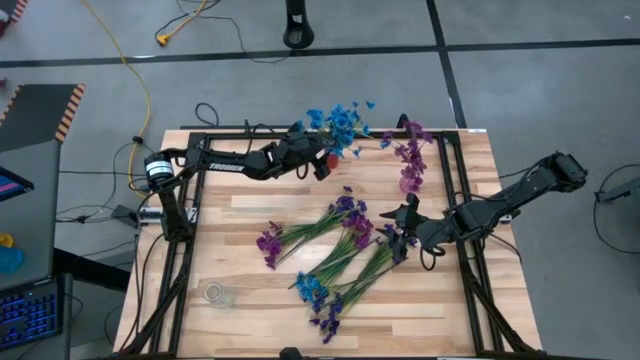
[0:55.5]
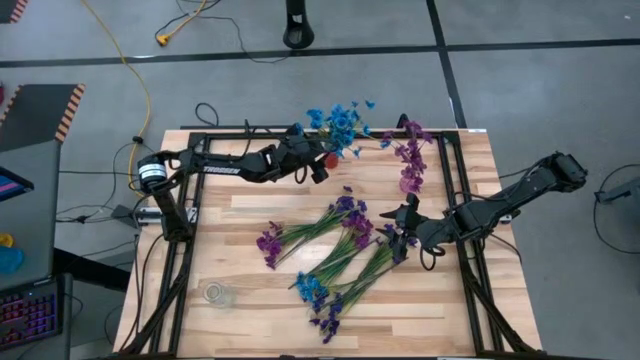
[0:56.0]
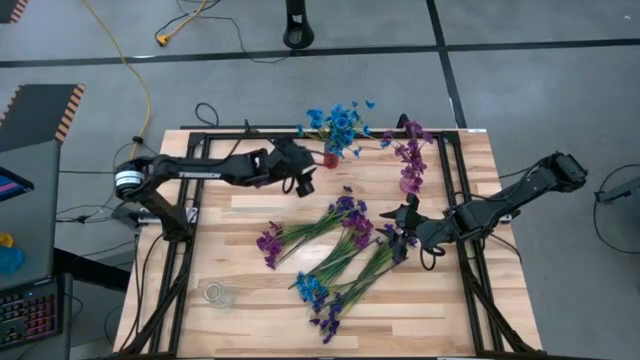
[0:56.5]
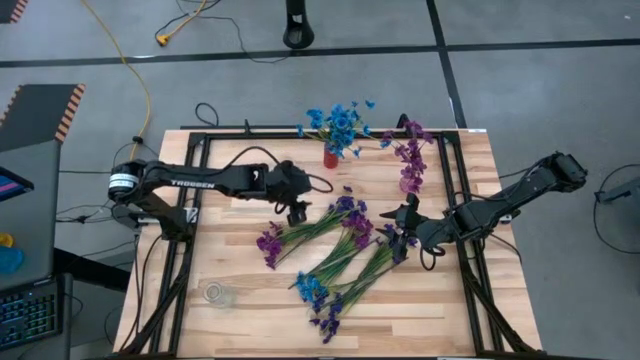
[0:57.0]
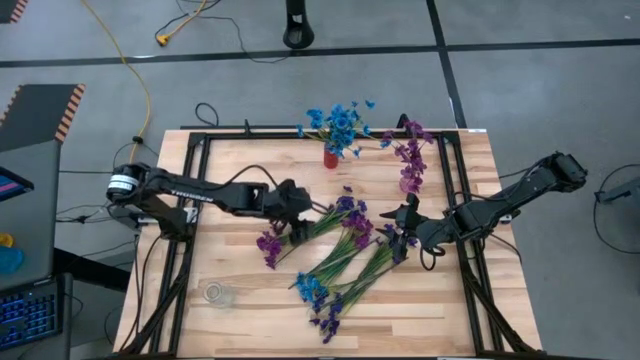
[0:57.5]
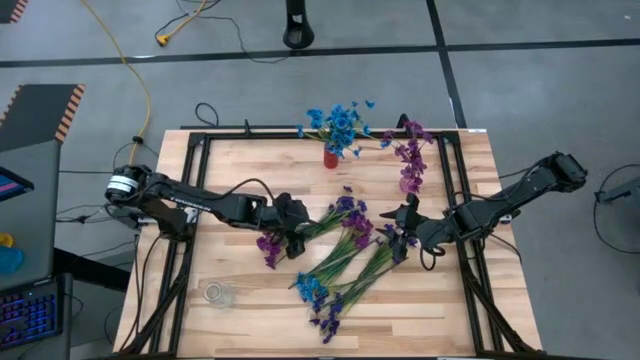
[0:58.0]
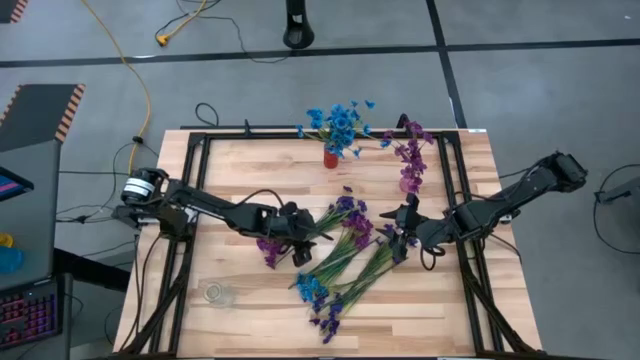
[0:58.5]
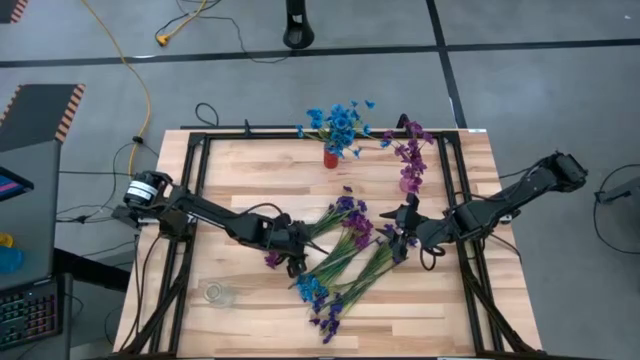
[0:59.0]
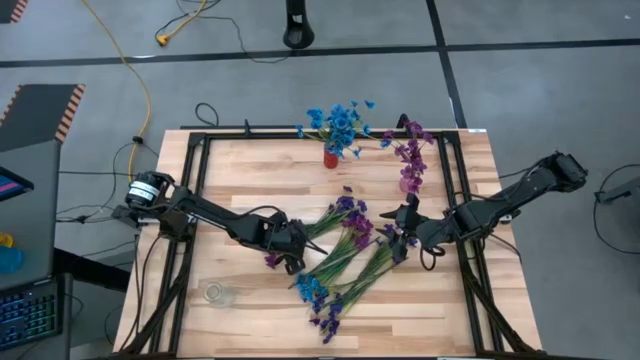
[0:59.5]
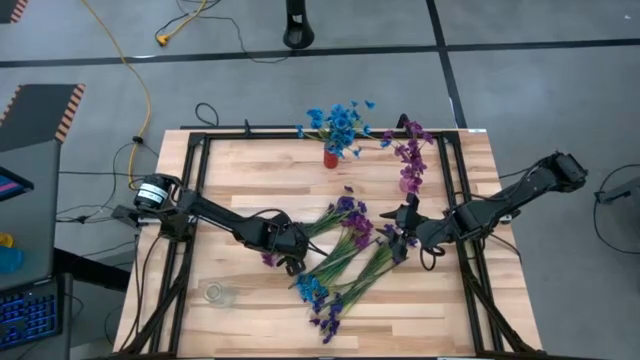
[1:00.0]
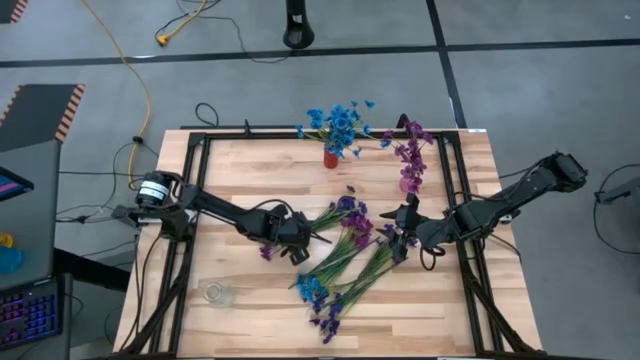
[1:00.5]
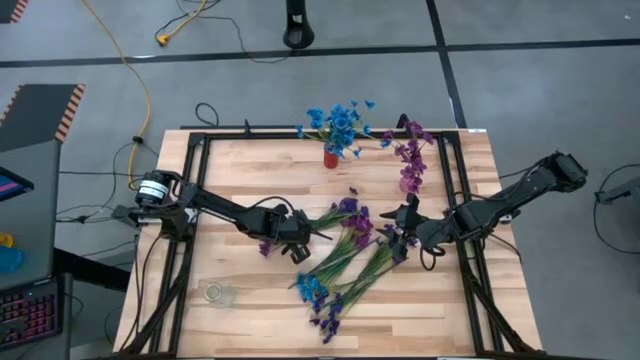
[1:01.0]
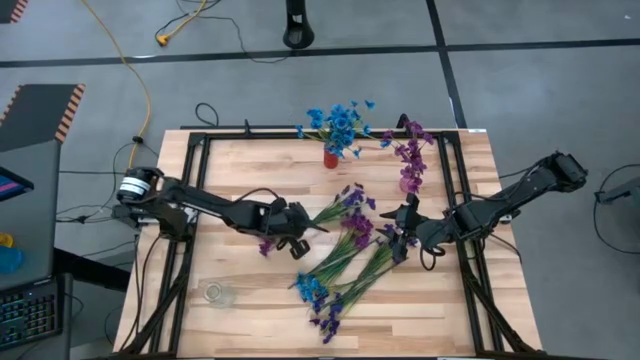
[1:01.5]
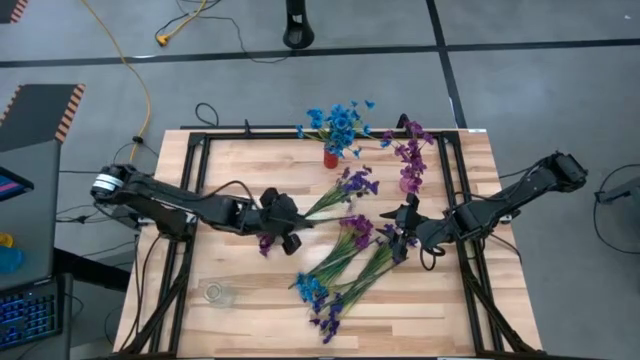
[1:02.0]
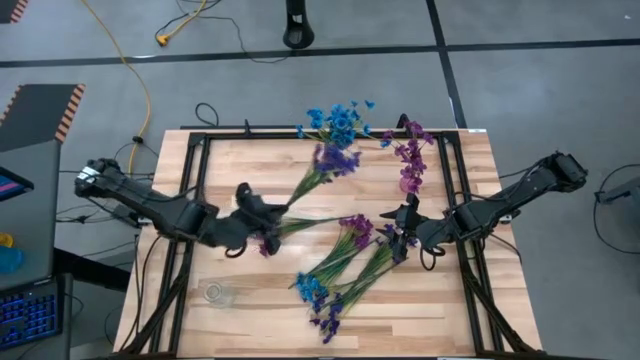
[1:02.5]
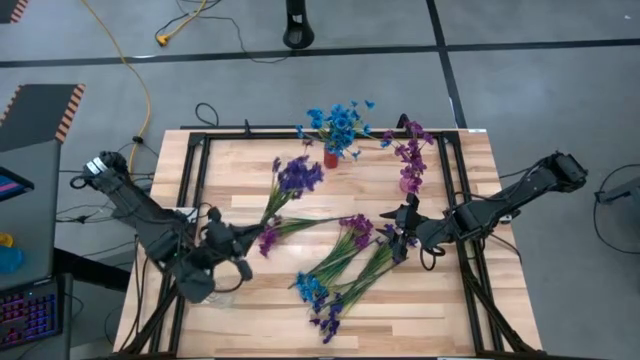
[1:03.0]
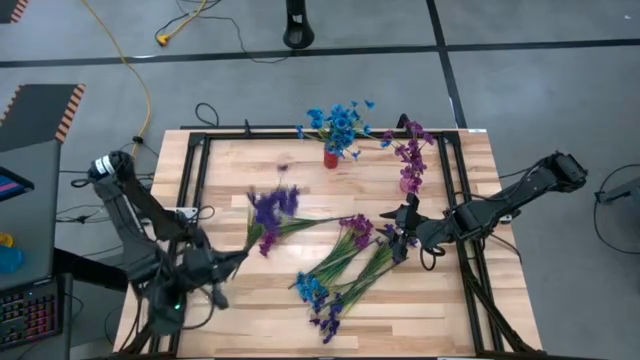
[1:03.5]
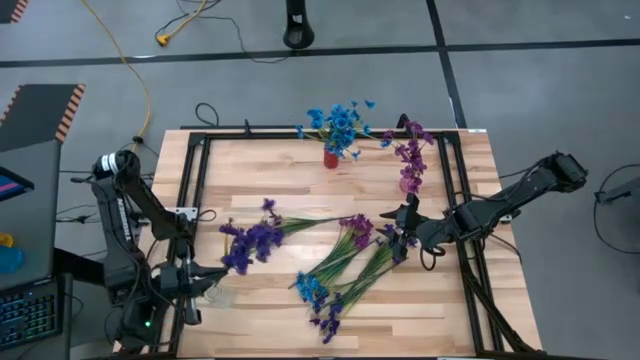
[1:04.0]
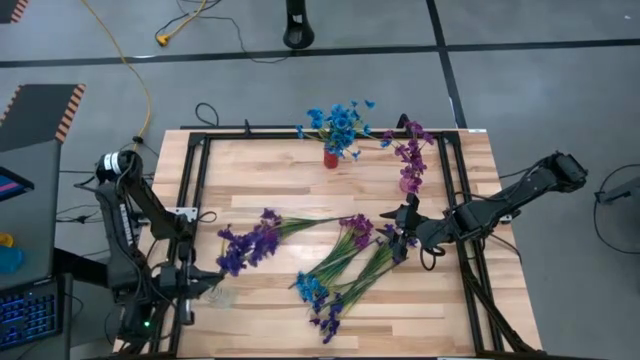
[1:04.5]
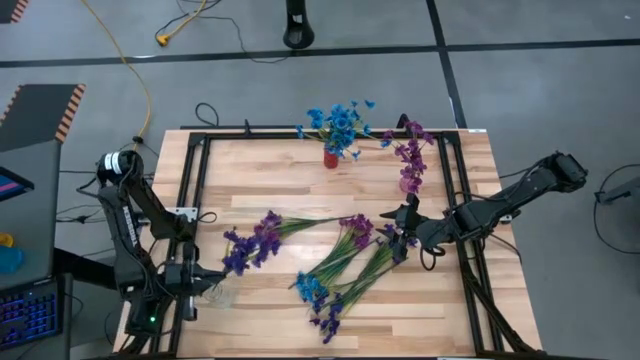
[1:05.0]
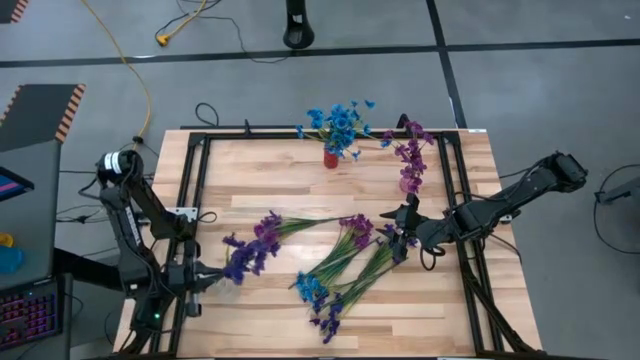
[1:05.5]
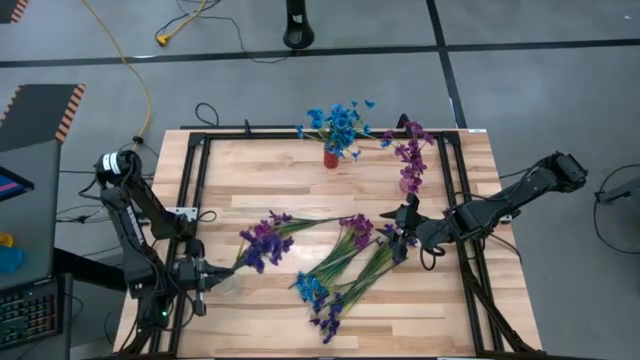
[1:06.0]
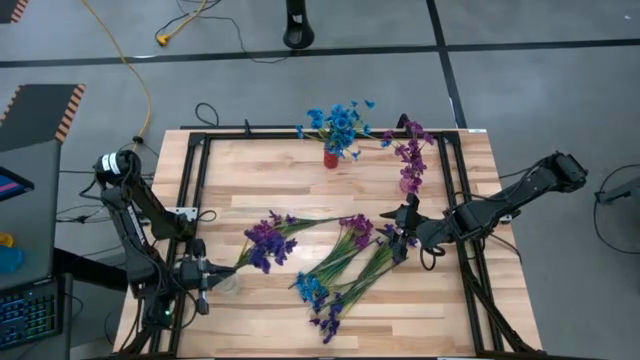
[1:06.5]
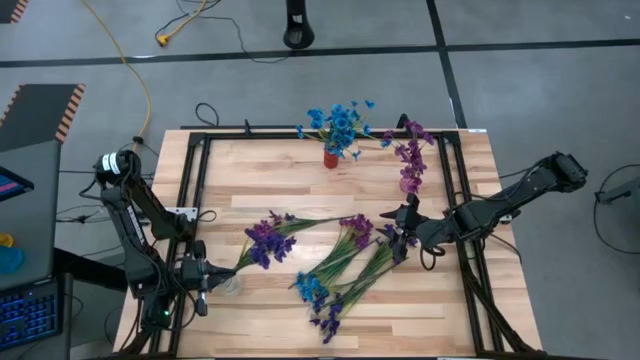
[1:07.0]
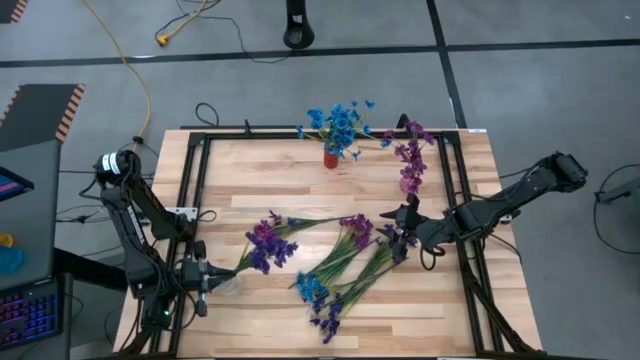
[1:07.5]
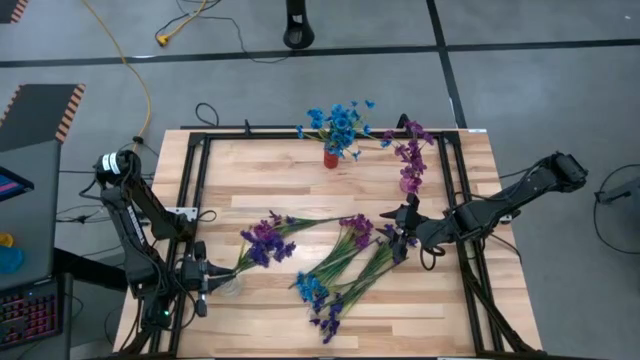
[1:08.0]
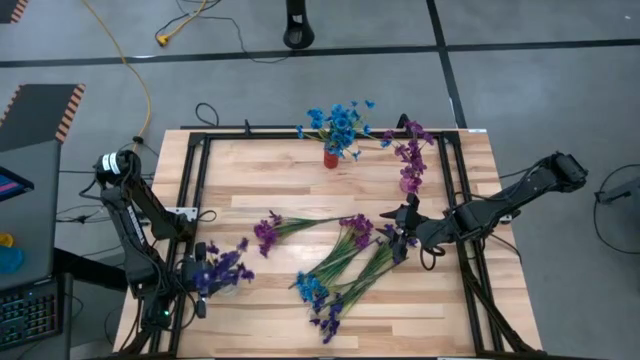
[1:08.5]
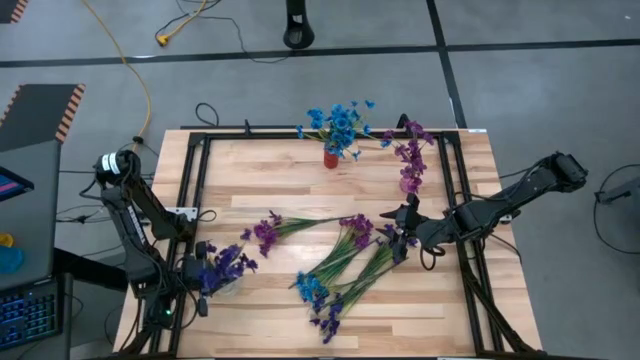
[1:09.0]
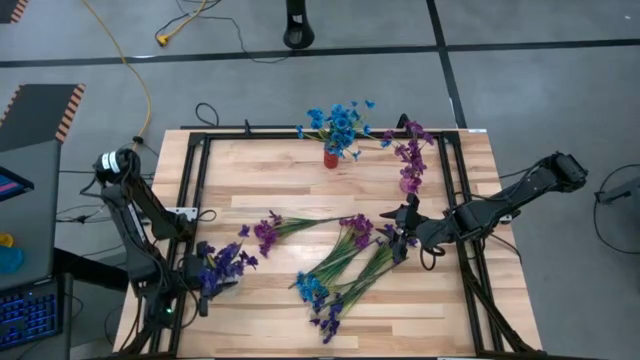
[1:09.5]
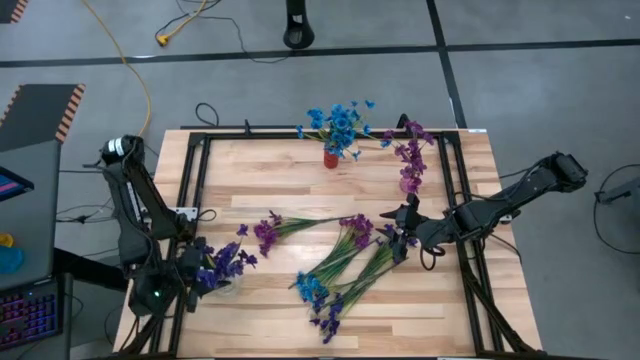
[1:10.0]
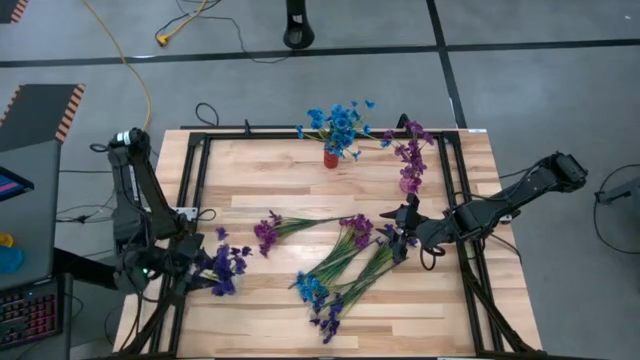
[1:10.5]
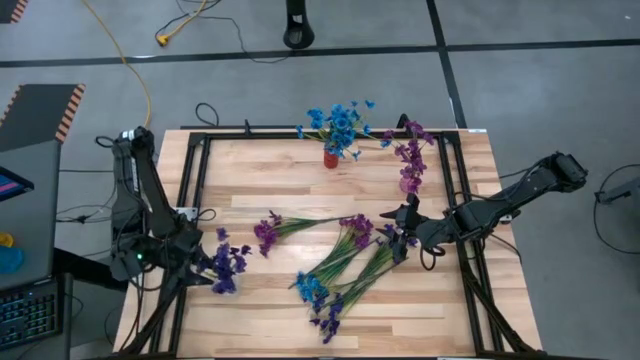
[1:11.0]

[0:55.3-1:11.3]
Task: Sort flowers into vase by color
Put the top dark blue flowers into the transparent vase

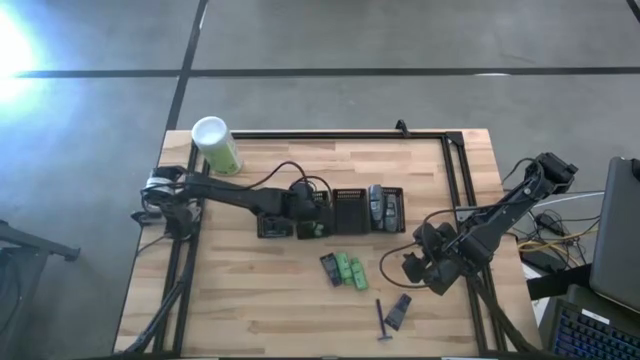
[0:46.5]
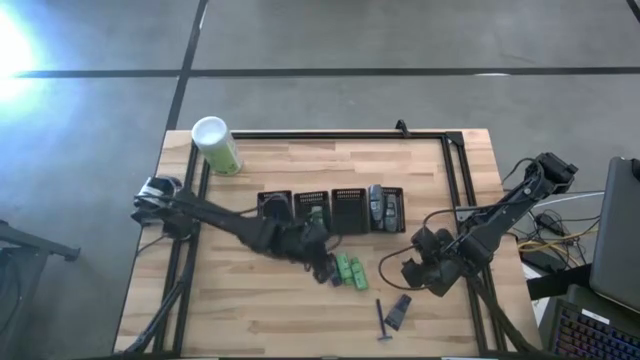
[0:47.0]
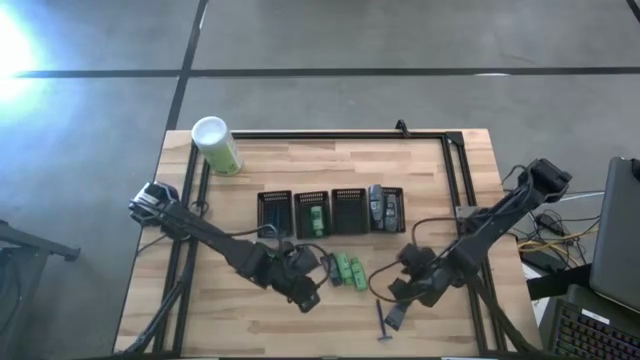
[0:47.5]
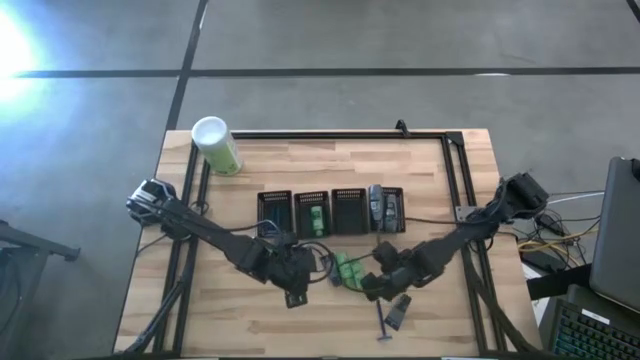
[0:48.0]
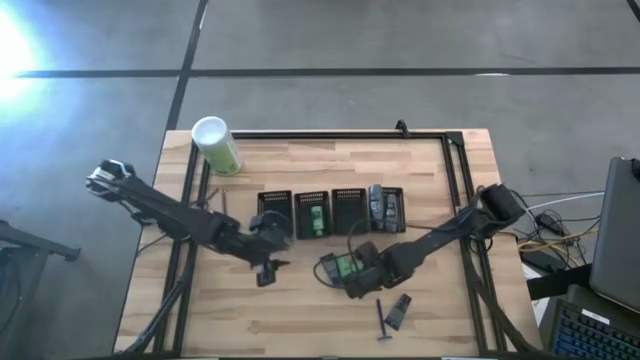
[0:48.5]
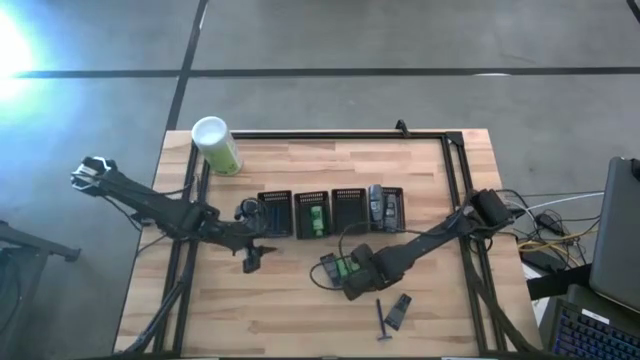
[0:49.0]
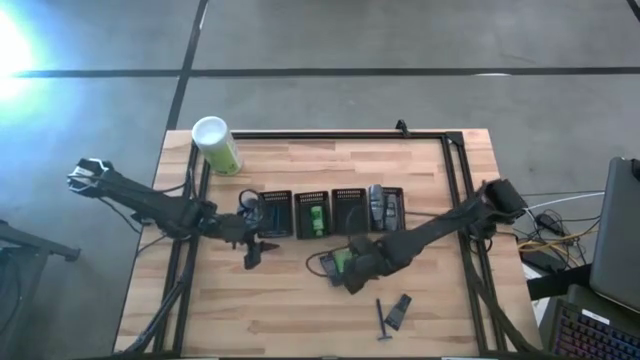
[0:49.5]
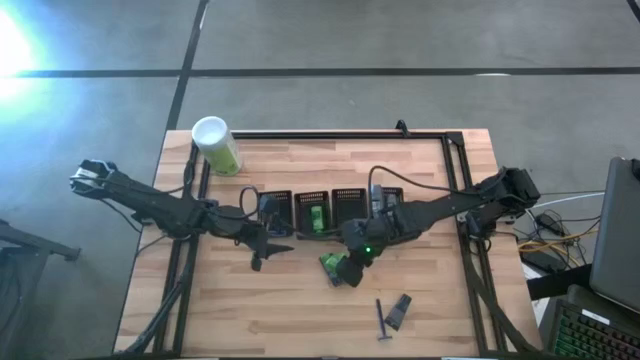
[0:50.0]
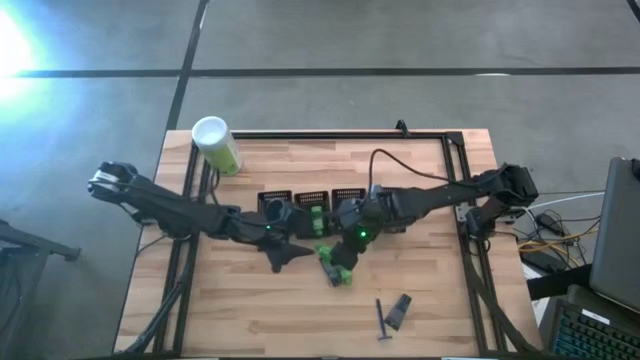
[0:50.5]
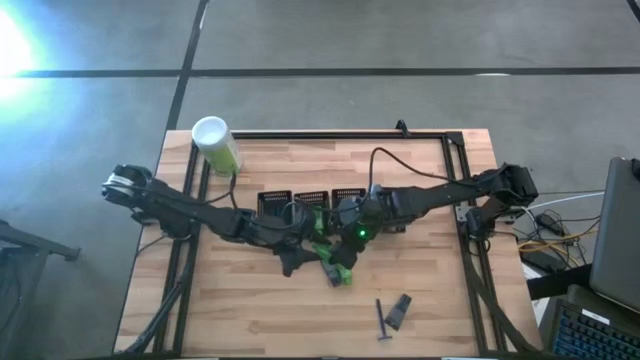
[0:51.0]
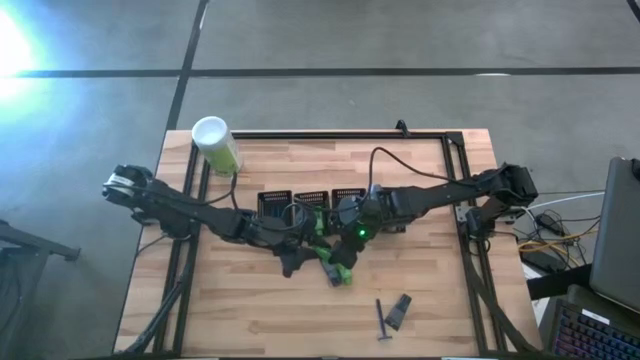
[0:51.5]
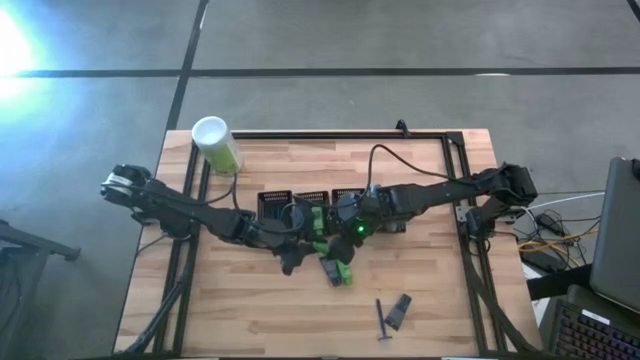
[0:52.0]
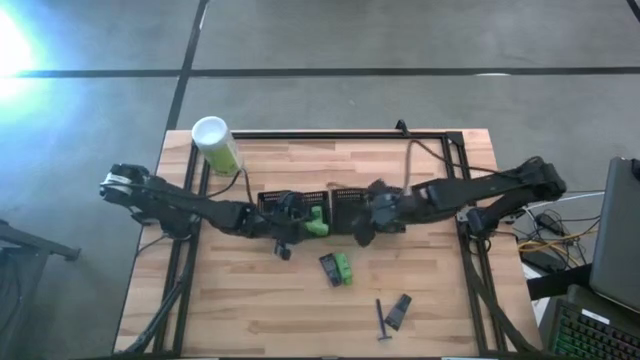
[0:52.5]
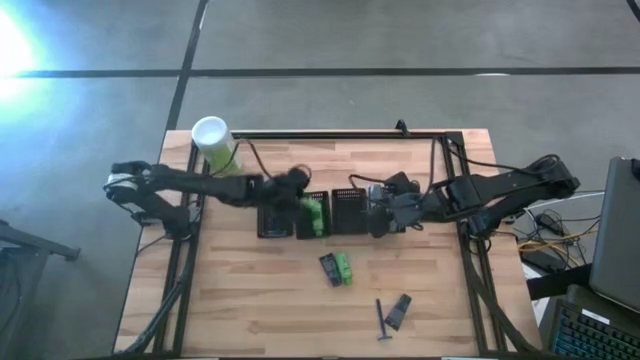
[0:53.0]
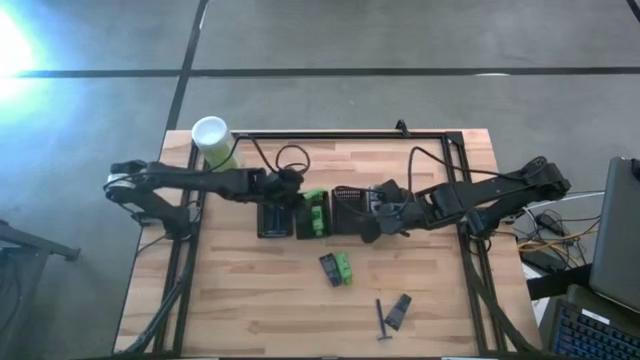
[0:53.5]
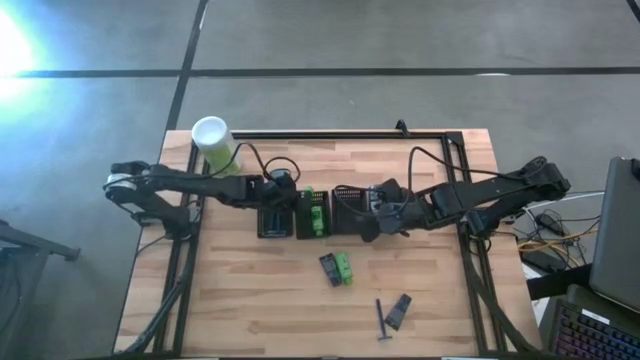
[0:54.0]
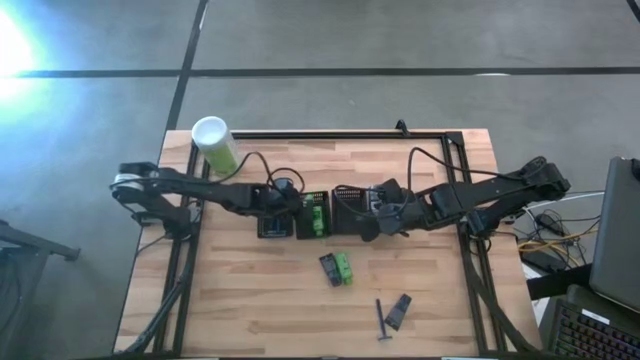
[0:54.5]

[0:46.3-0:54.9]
Task: Pick & Place Travel size toiletries
Put the green shampoo into the black basket
